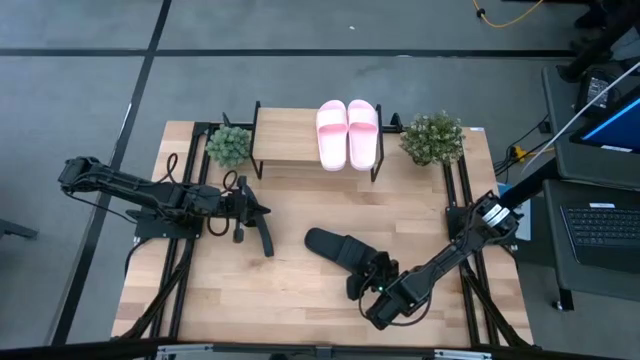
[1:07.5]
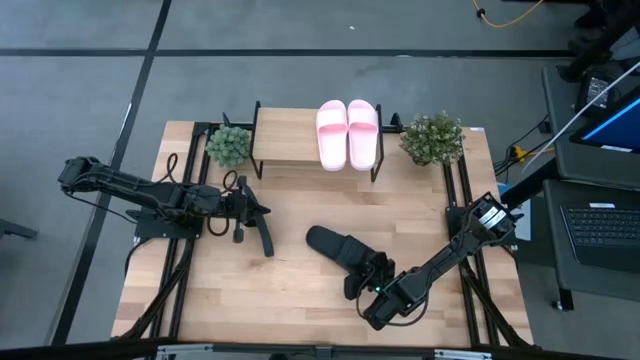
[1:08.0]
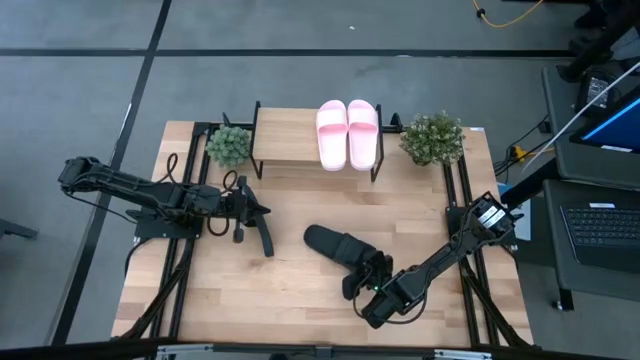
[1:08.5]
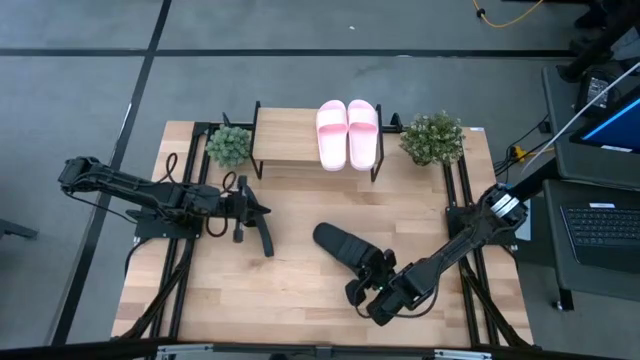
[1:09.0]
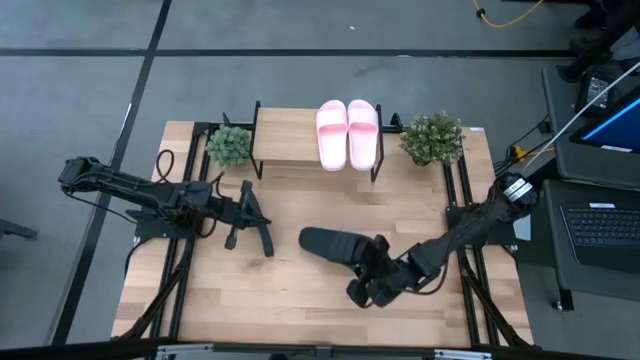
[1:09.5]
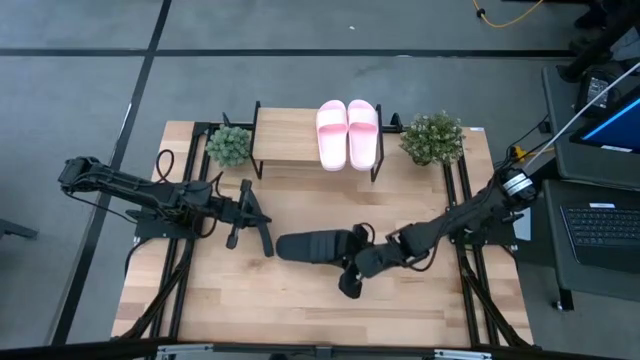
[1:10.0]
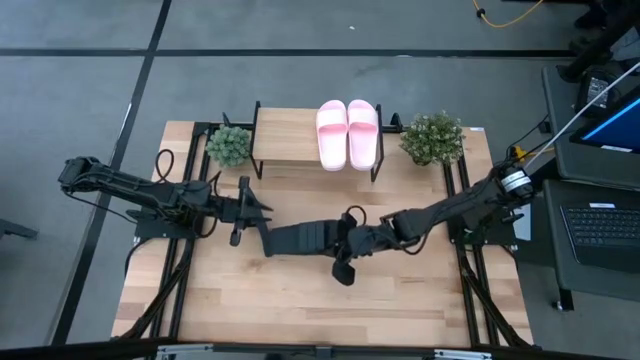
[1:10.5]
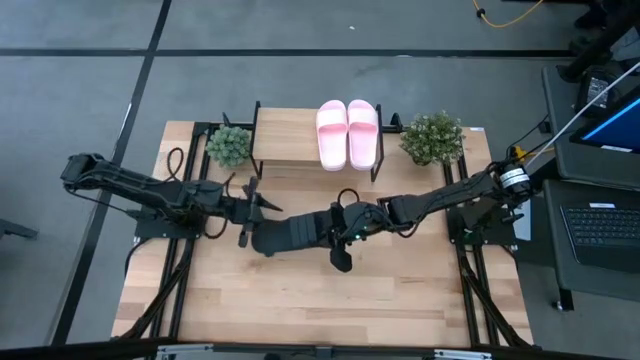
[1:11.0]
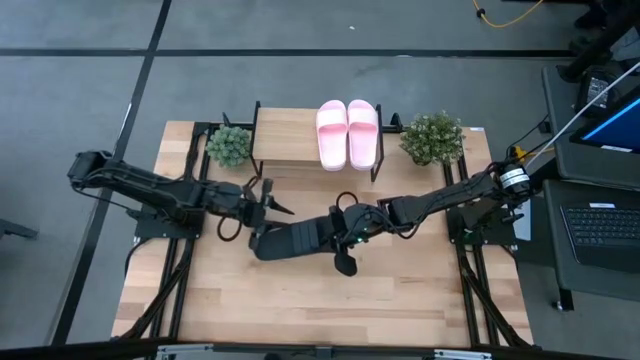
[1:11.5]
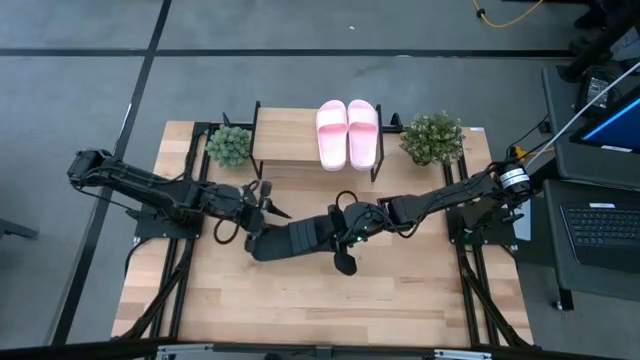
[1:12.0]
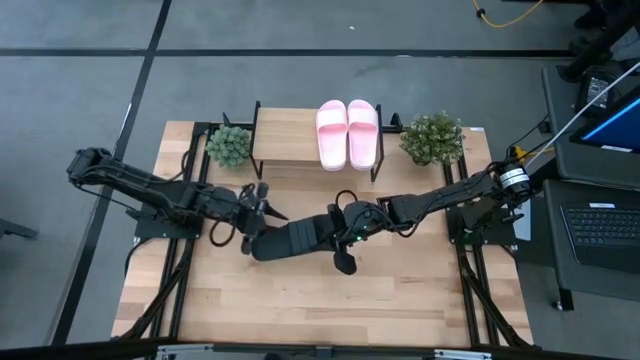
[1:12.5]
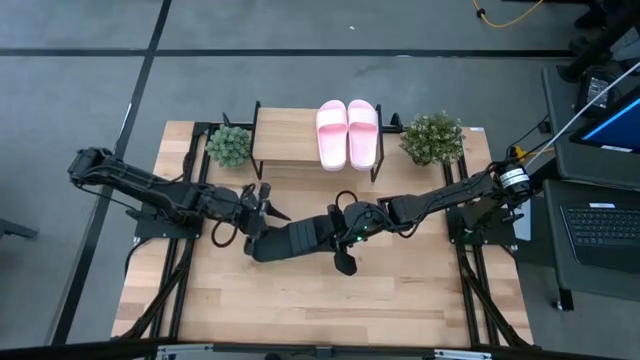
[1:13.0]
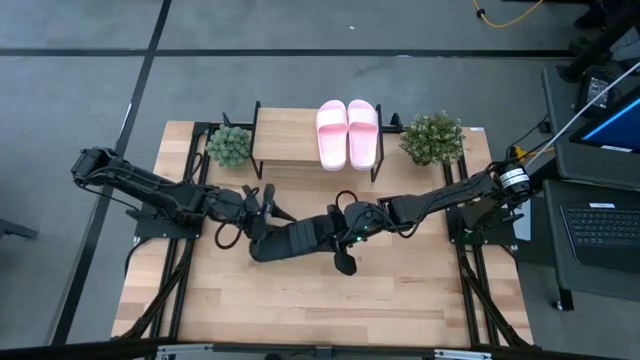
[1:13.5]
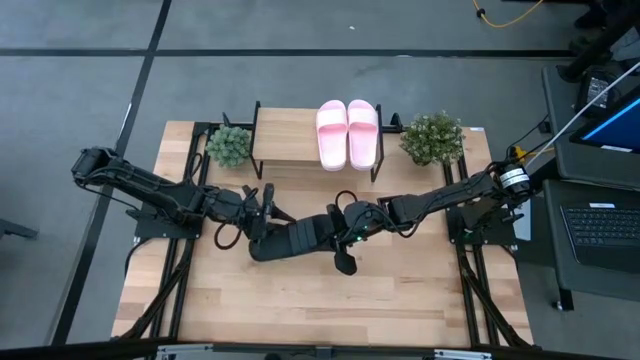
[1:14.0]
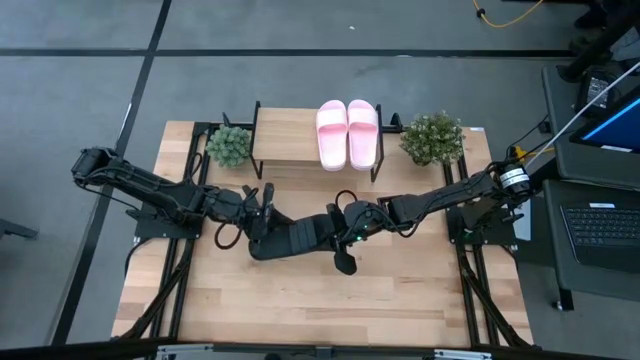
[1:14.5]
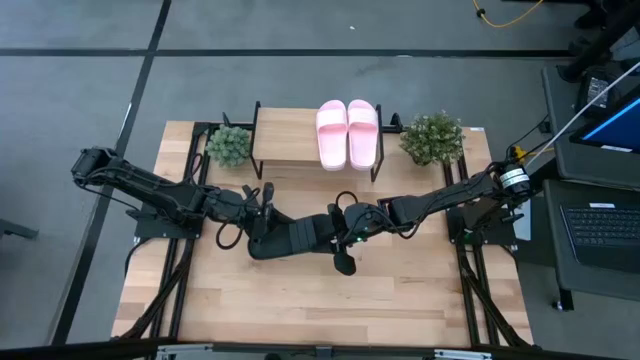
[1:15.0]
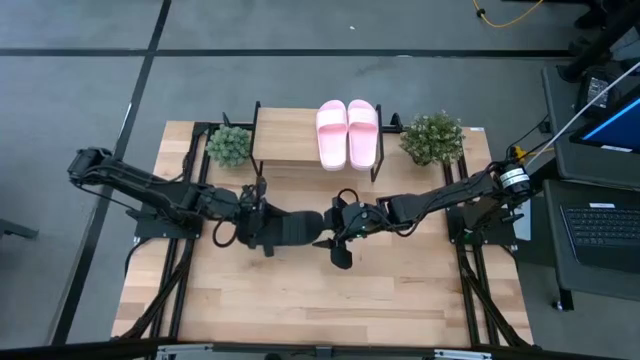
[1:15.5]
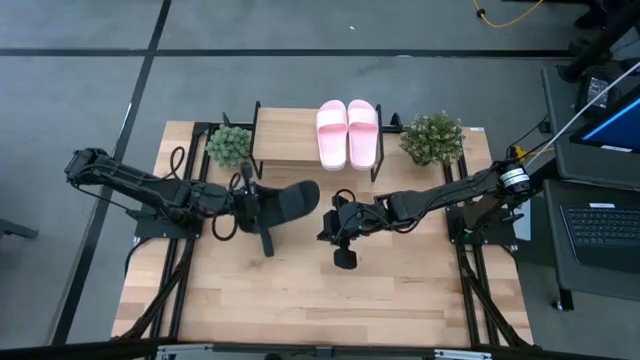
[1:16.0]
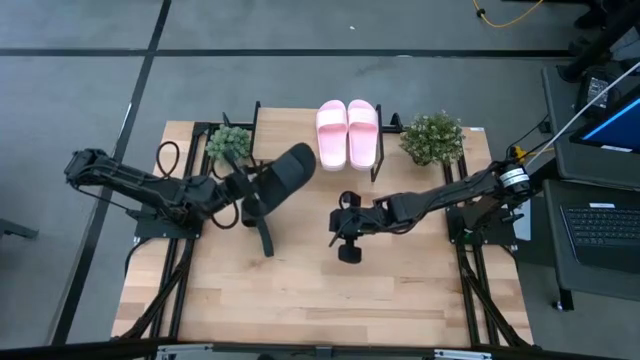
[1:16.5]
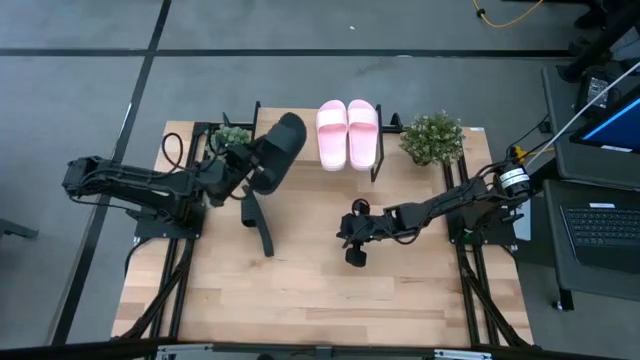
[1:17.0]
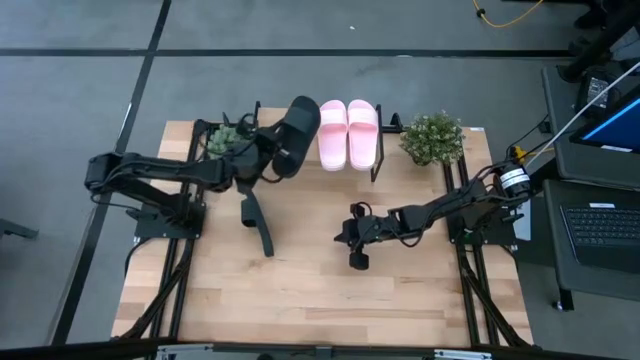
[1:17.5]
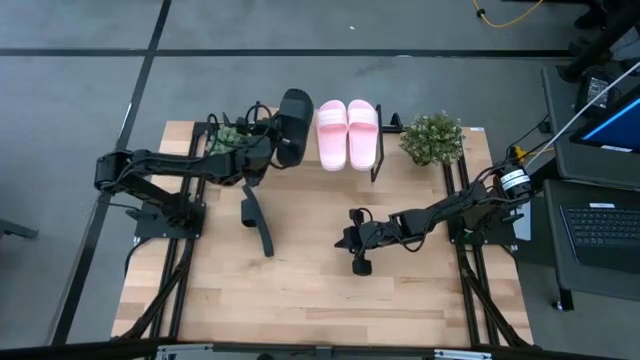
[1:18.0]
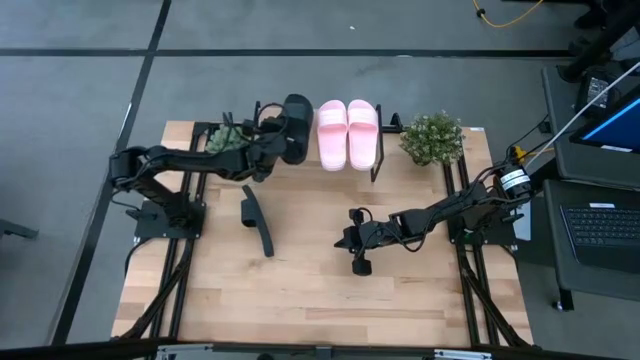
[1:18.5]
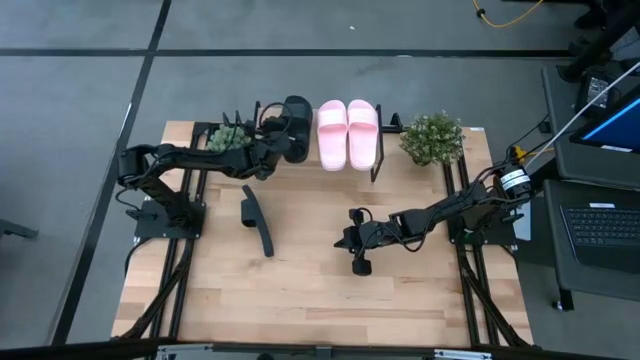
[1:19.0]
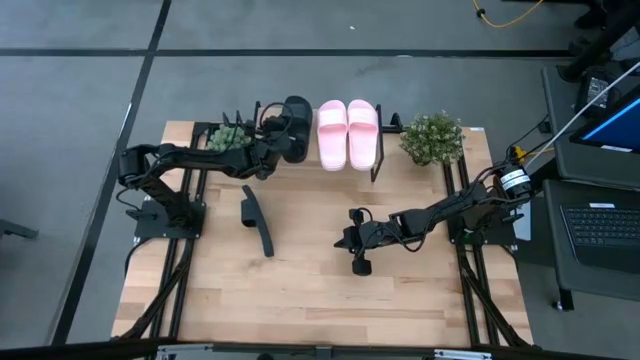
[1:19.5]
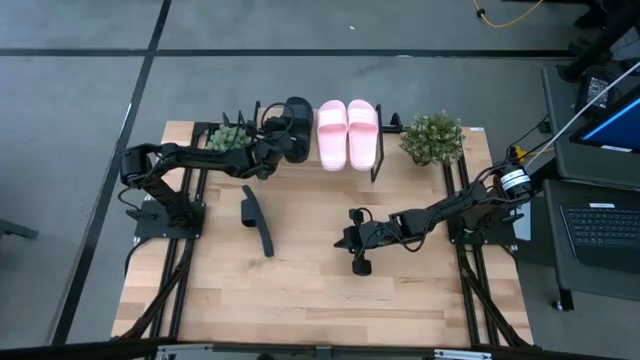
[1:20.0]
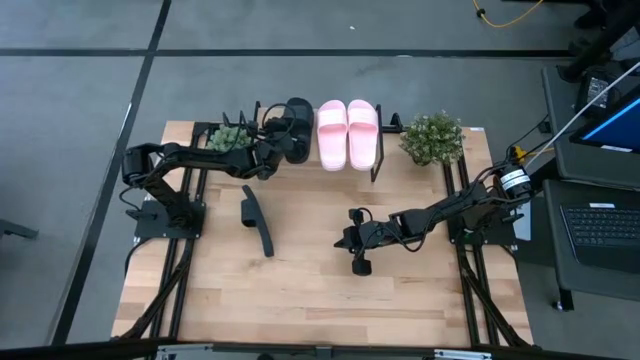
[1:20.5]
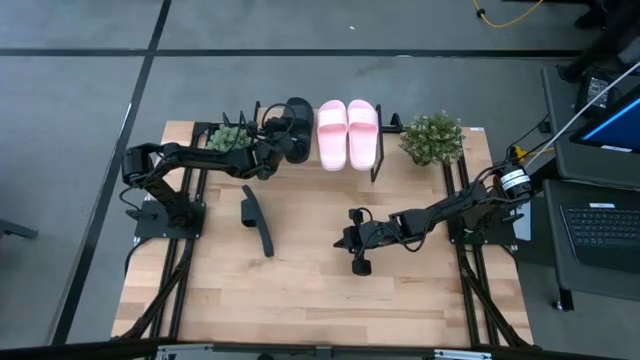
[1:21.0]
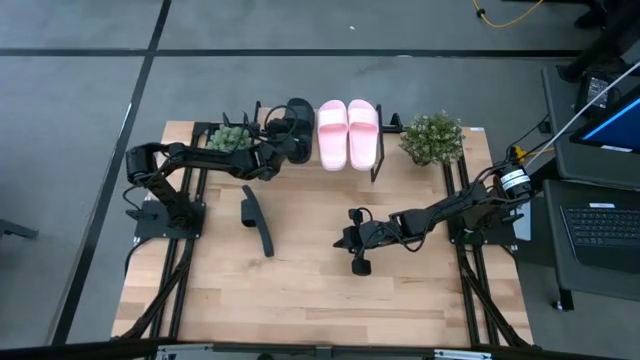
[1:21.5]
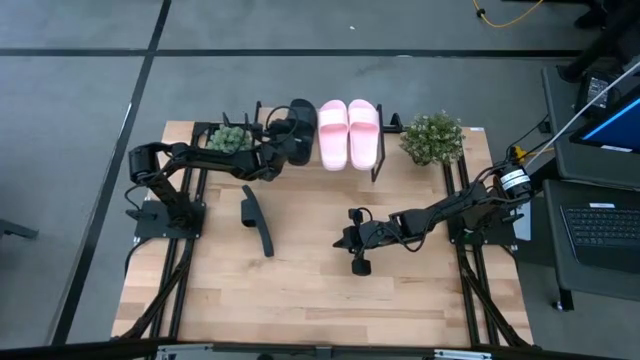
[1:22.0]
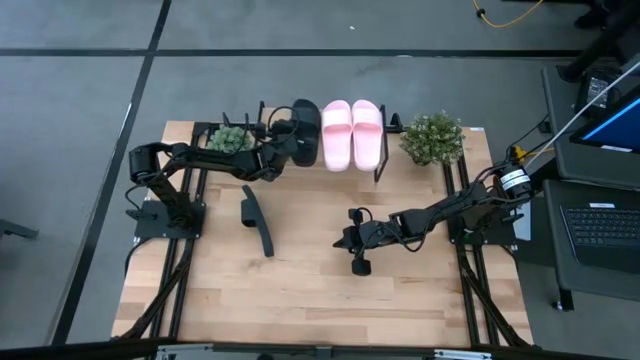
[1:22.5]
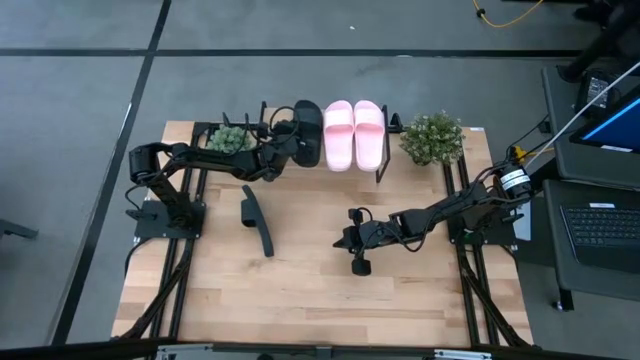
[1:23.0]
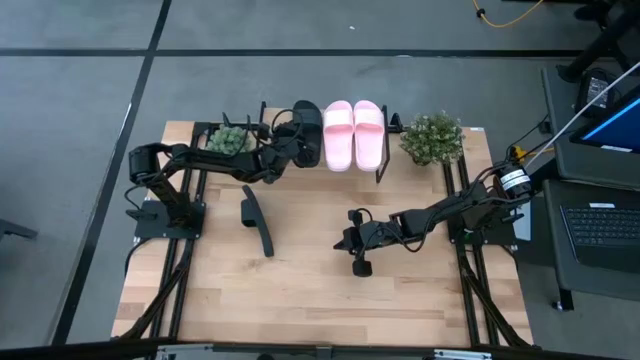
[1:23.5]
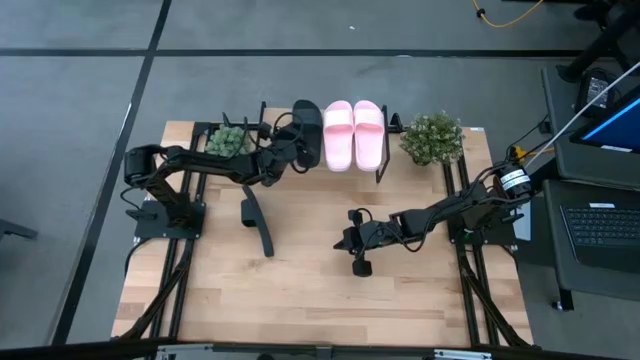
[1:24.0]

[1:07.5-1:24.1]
Task: Pick and place slides into the shelf
Put the bottom black slipper on the shelf

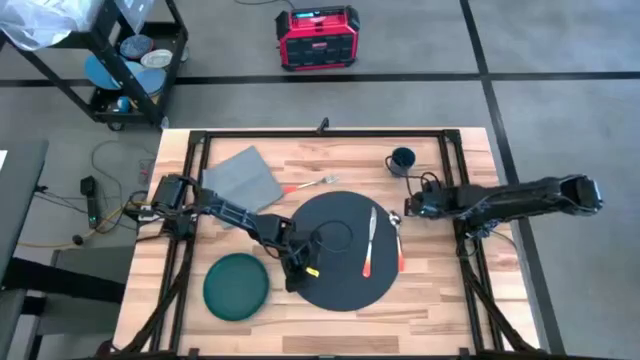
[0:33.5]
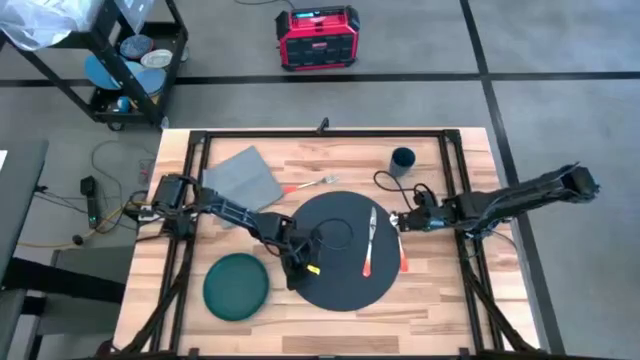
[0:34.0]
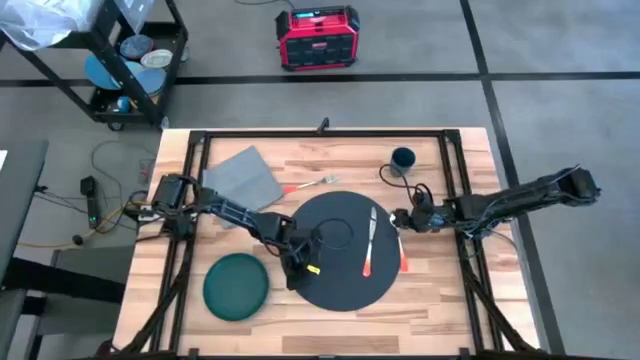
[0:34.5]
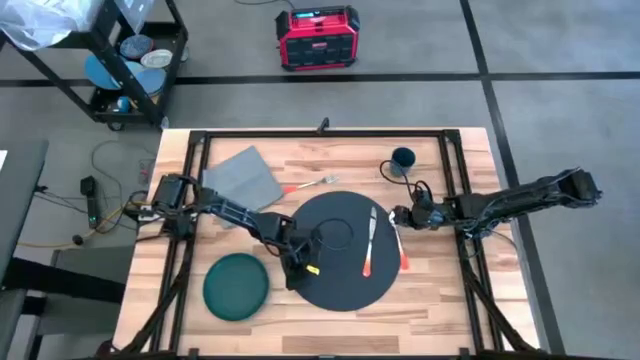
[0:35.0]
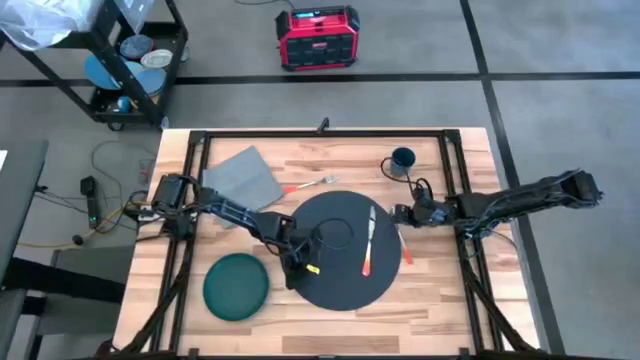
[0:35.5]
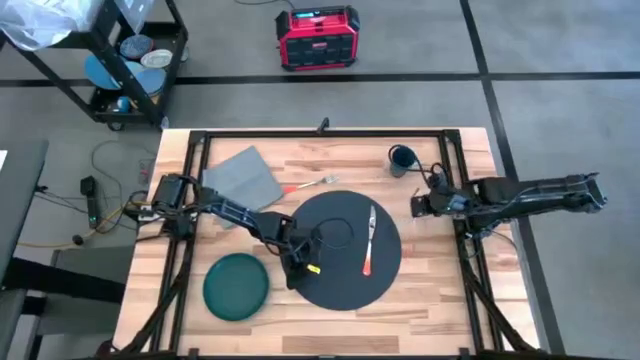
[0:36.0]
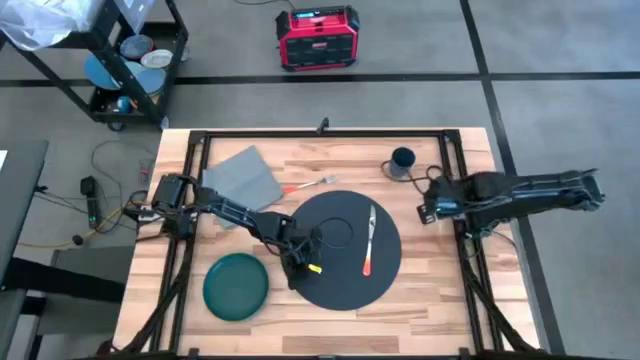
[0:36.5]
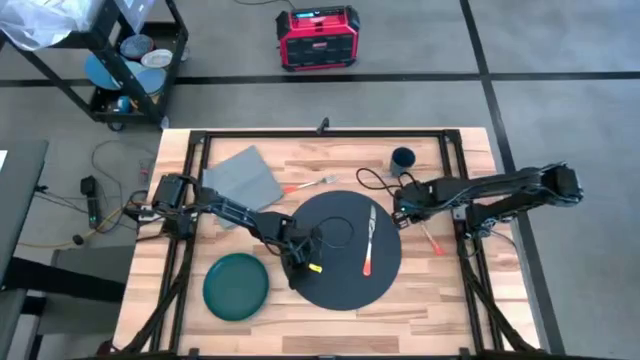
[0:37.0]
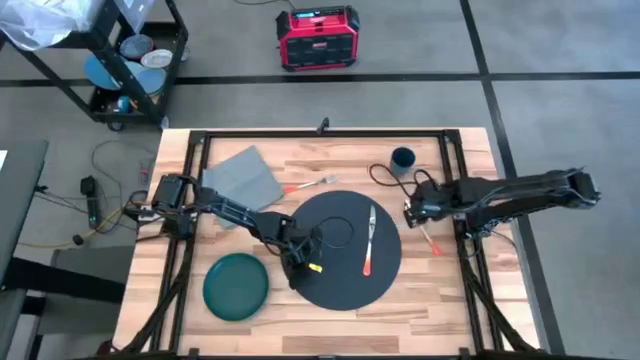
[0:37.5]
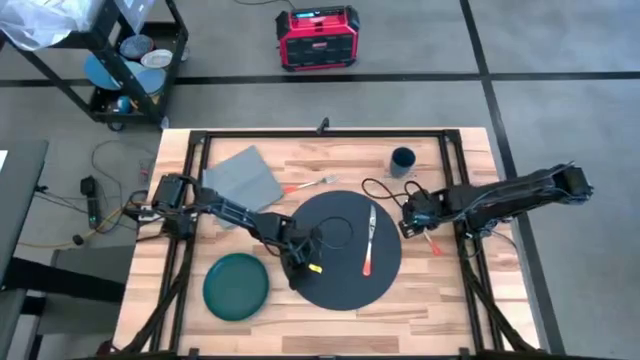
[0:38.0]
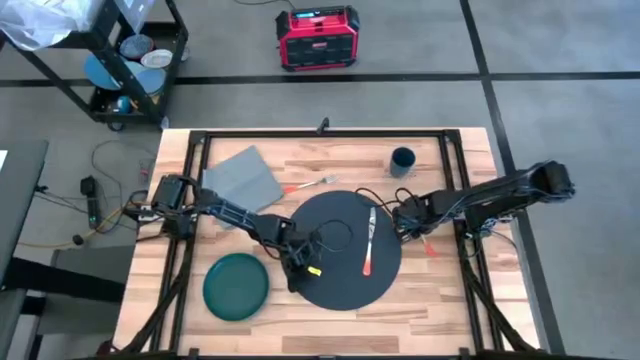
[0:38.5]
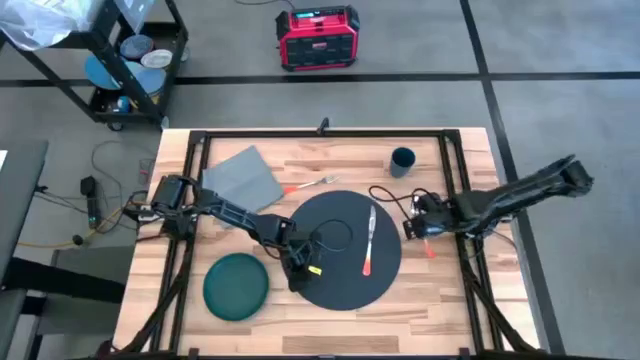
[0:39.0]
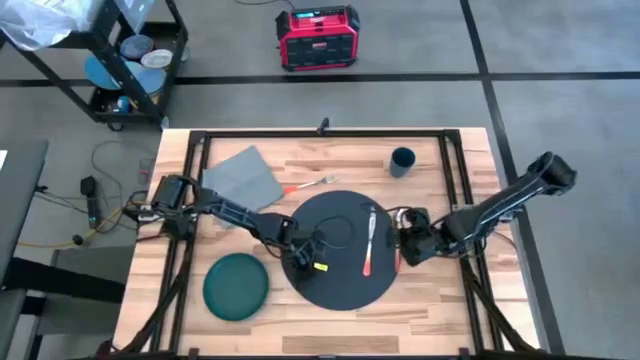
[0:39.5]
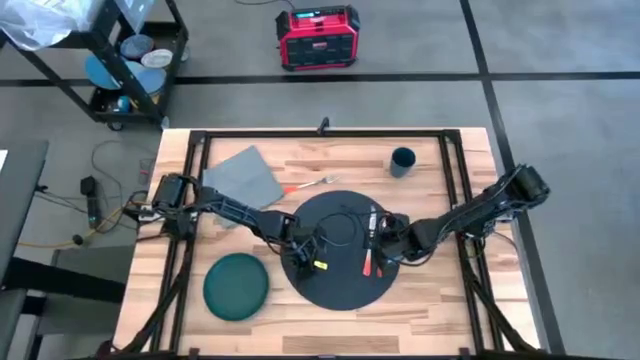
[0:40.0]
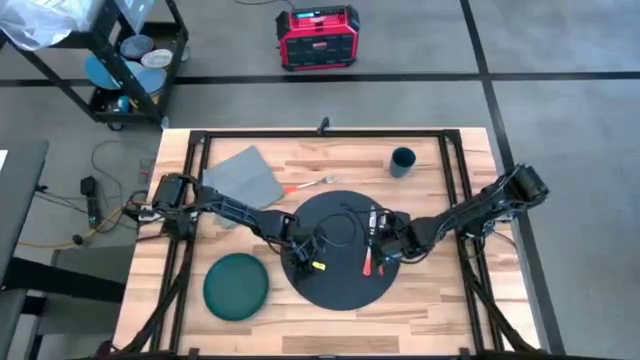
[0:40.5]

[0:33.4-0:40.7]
Task: Set table place
Put the orange spoon to the right of the orange table knife on the blue tablemat
